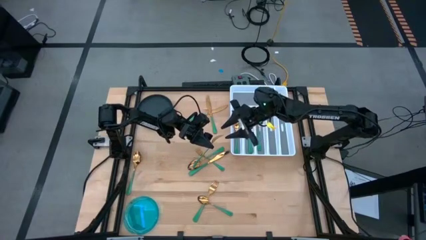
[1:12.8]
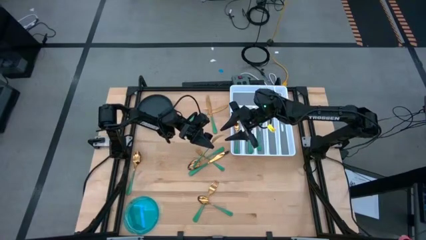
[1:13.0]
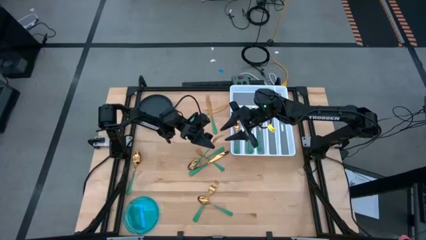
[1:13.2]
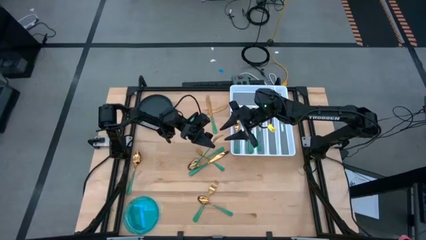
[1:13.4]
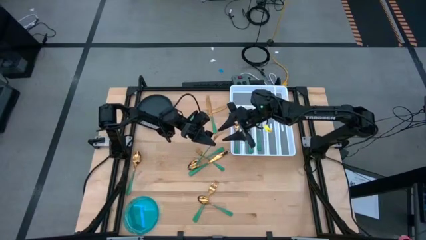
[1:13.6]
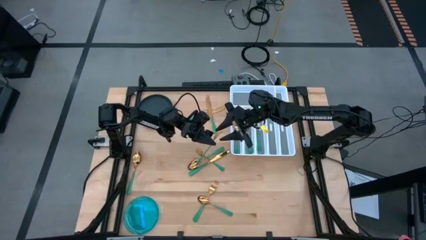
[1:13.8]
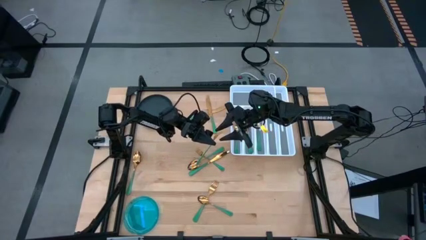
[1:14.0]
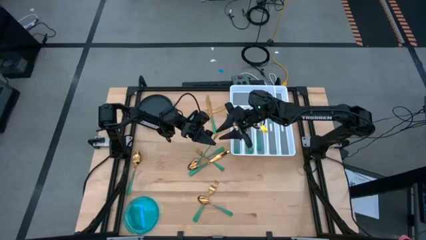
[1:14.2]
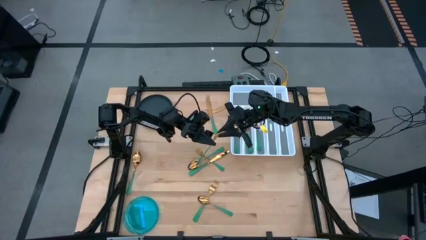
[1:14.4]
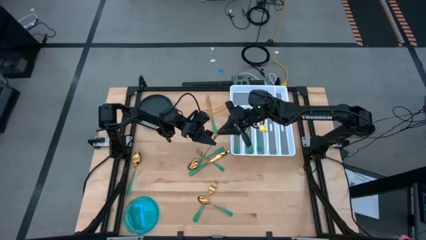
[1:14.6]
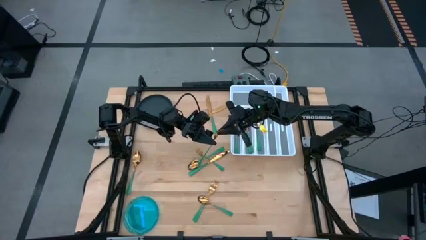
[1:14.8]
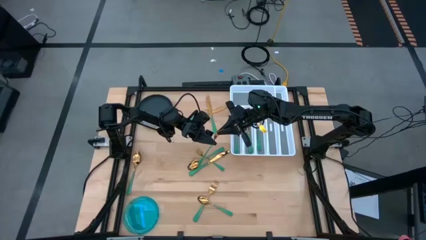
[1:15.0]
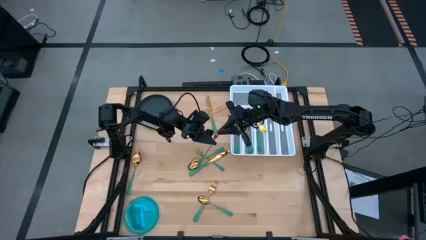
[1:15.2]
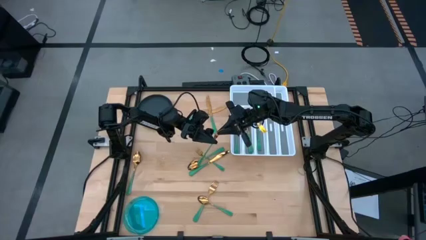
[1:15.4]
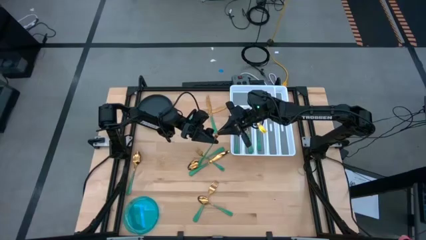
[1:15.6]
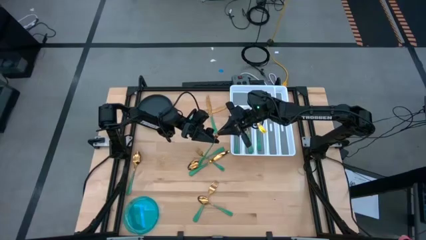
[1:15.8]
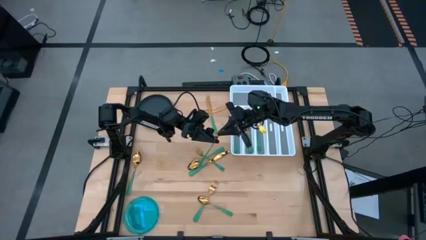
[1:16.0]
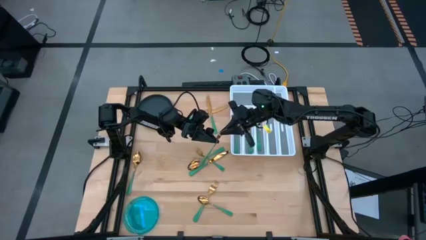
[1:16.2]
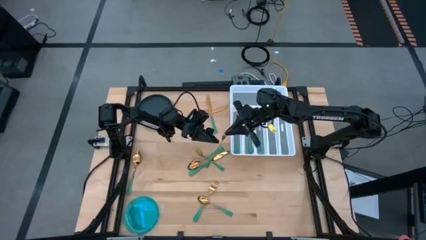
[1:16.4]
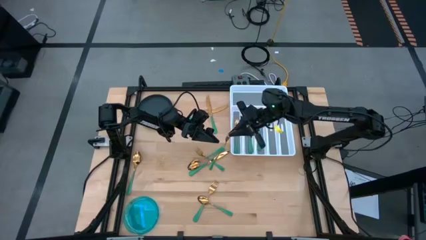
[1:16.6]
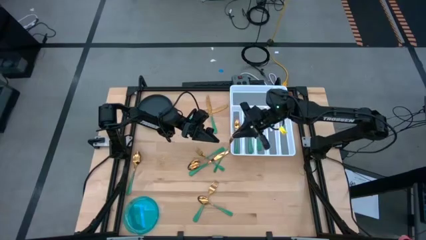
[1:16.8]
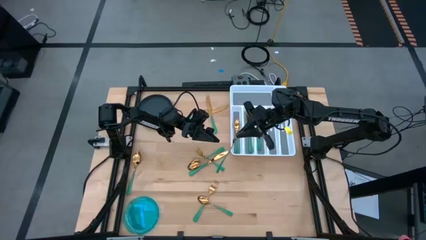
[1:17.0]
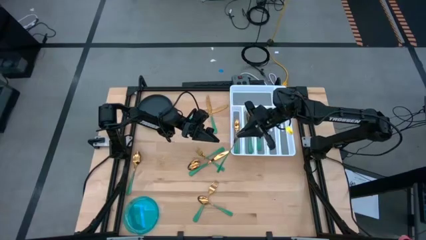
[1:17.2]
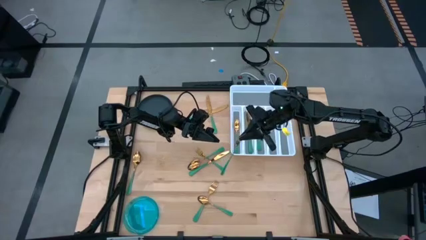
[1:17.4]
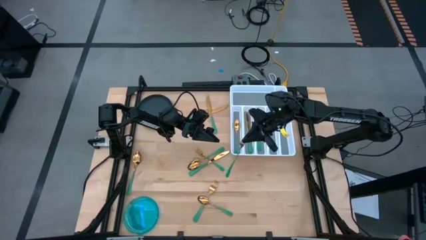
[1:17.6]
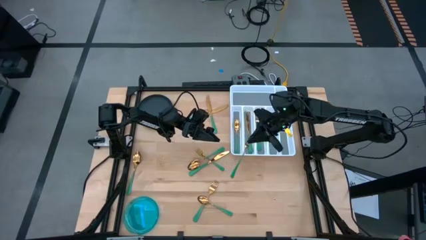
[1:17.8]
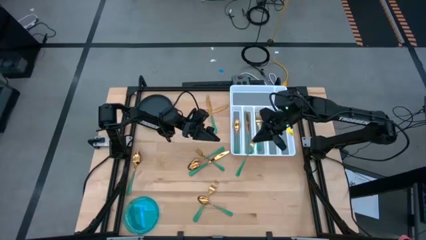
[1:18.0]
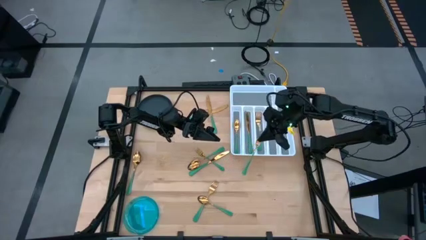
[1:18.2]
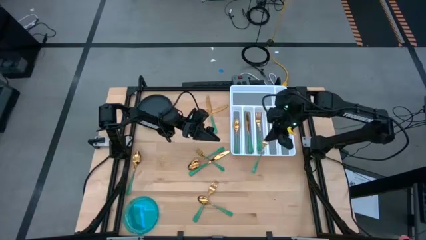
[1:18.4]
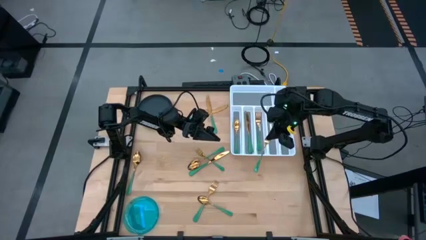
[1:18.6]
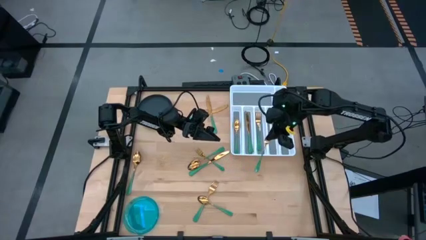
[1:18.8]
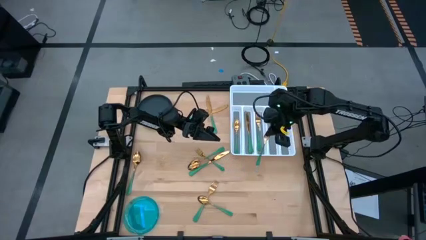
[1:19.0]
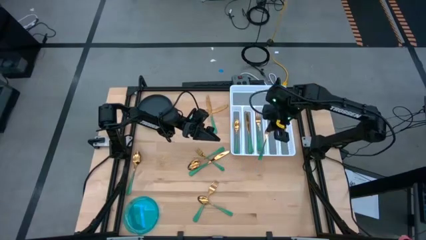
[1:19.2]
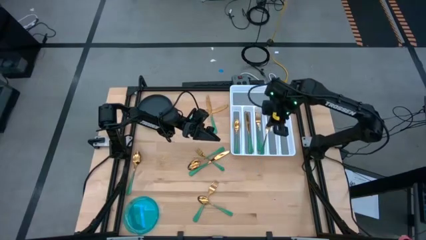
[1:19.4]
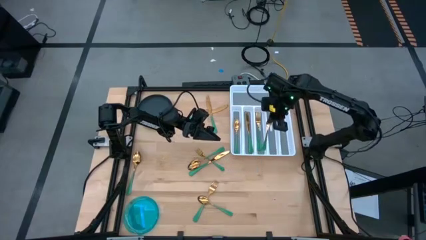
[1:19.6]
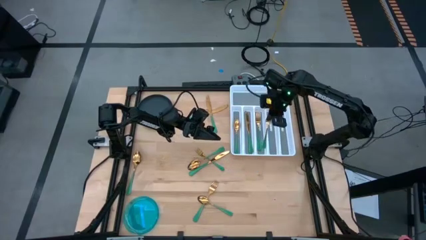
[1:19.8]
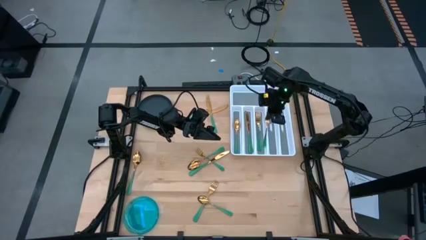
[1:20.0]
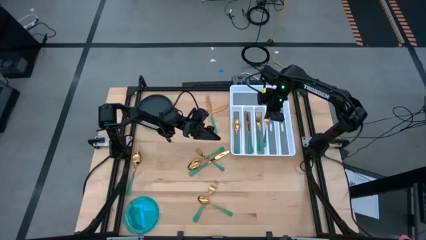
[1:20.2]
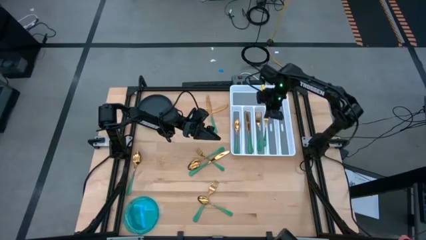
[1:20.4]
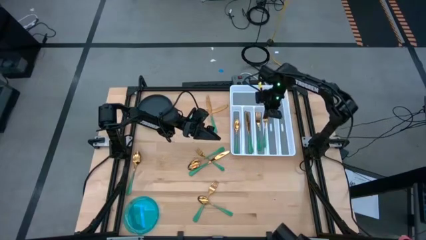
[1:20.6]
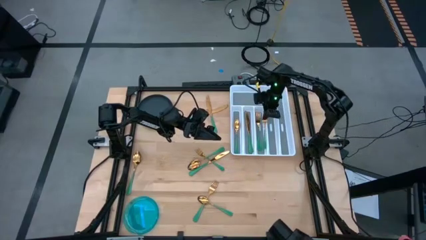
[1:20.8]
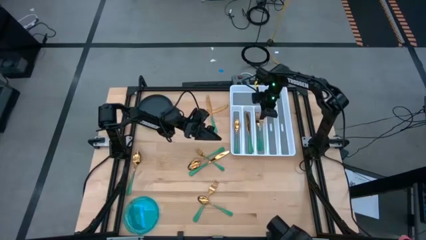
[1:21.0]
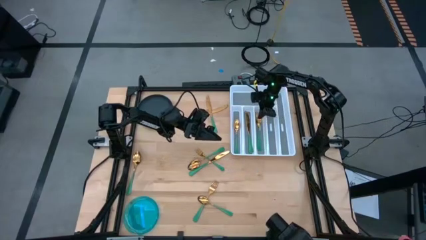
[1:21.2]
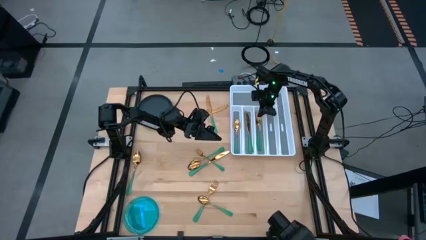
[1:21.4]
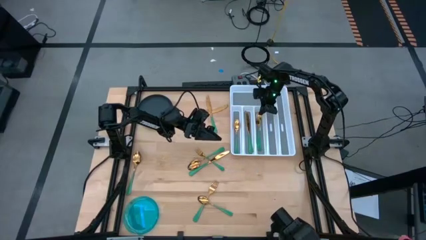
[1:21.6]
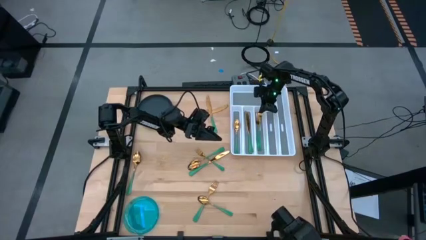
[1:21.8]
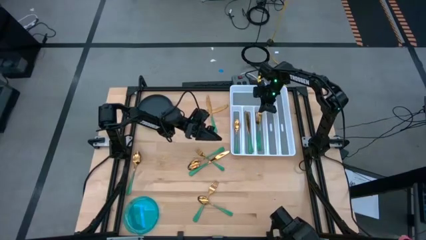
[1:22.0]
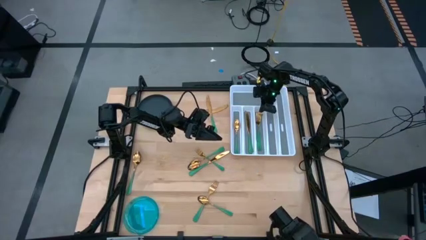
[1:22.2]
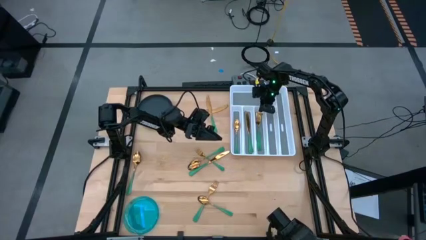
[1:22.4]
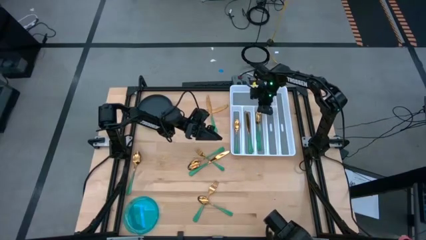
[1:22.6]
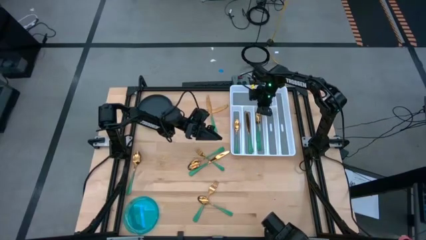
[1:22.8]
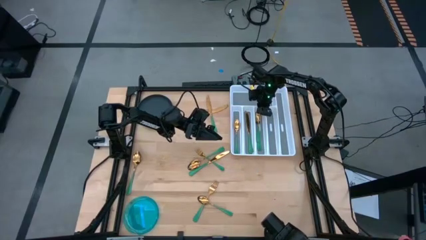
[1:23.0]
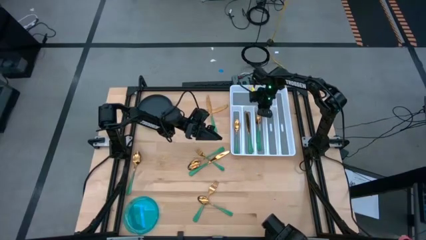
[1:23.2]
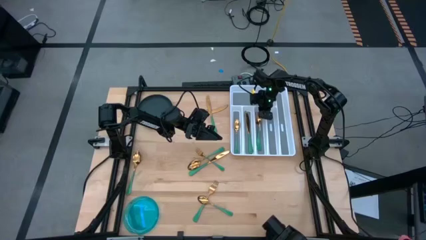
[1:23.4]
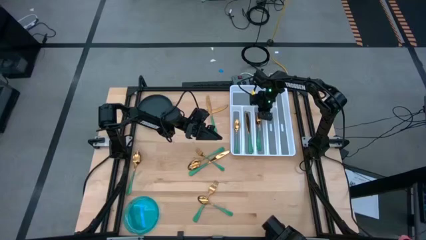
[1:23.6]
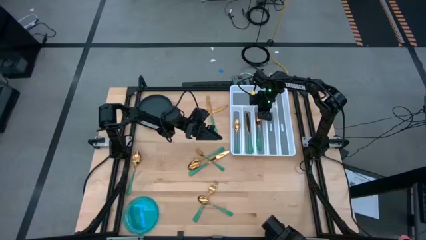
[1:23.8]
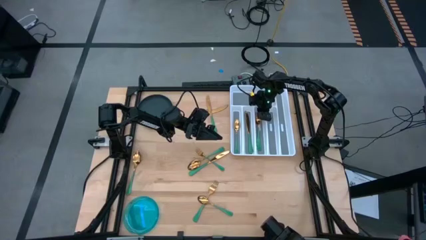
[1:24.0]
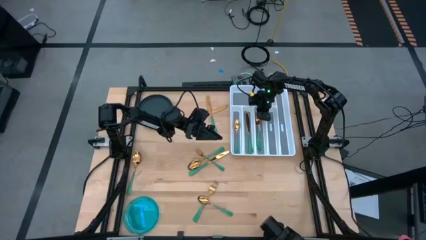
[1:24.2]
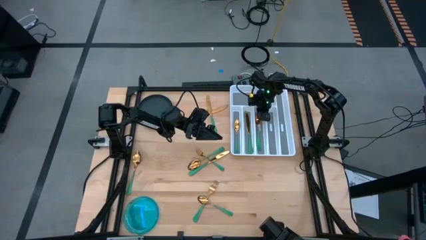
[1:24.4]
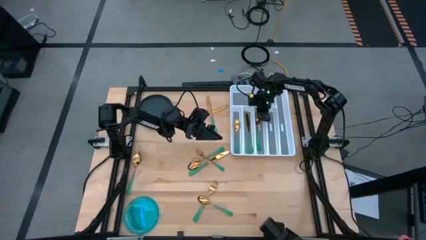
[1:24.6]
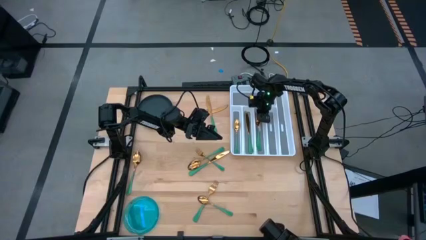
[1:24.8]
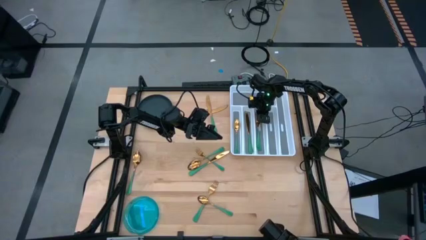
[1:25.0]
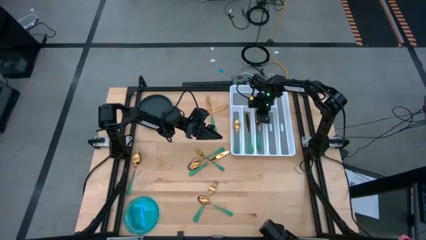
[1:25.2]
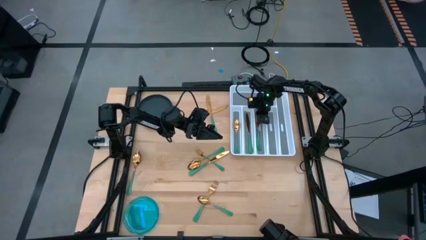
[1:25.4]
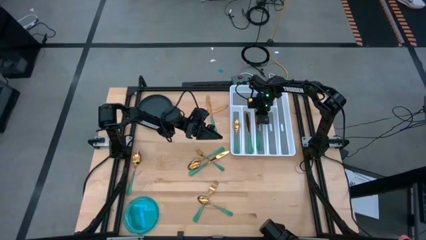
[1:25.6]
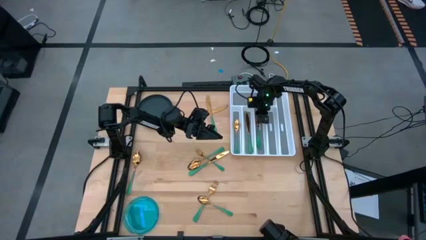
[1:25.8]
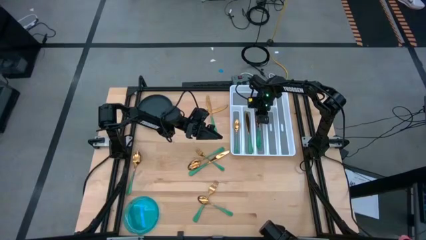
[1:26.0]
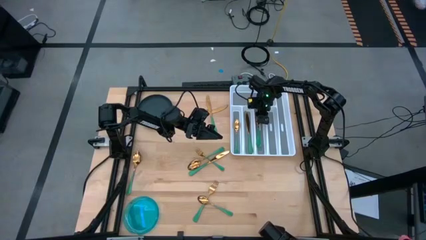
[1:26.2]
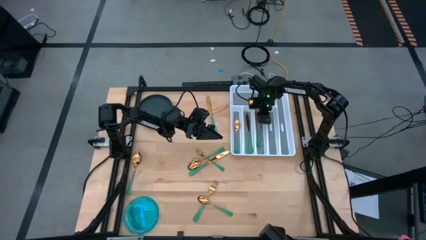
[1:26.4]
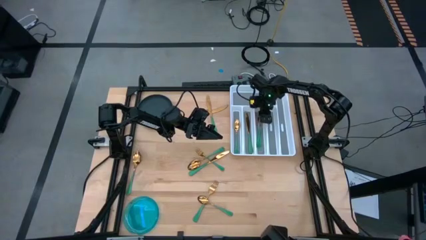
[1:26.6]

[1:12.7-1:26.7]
Task: Sort silverware
Put the green fork on the silverware organizer

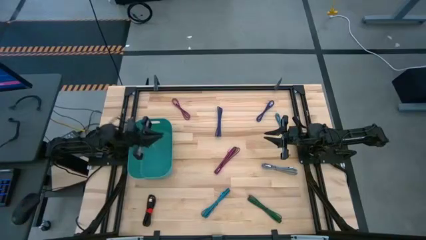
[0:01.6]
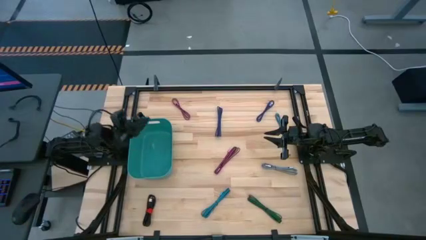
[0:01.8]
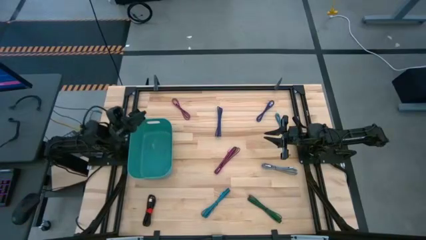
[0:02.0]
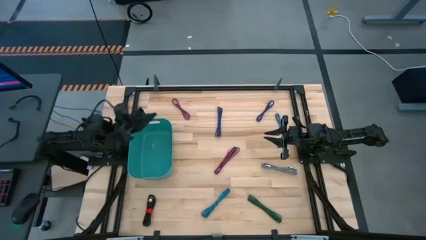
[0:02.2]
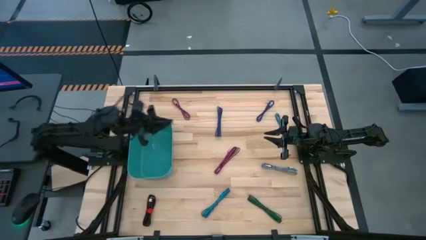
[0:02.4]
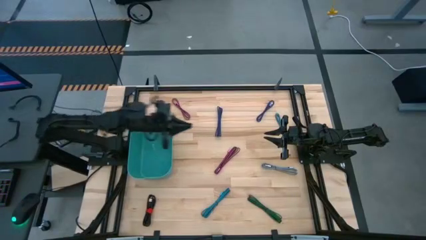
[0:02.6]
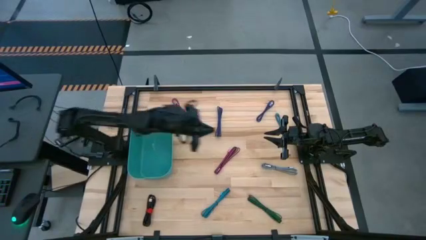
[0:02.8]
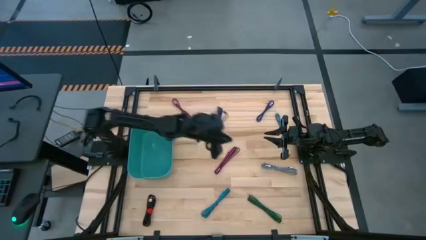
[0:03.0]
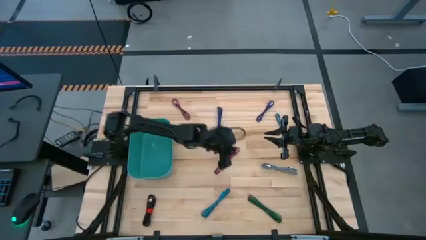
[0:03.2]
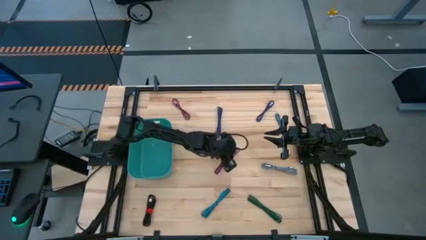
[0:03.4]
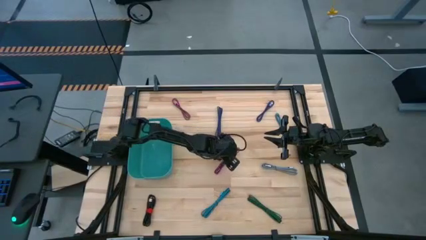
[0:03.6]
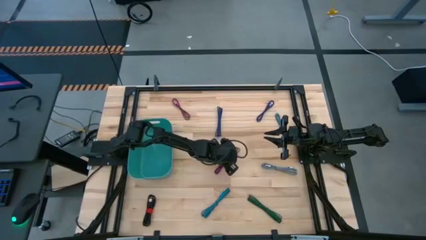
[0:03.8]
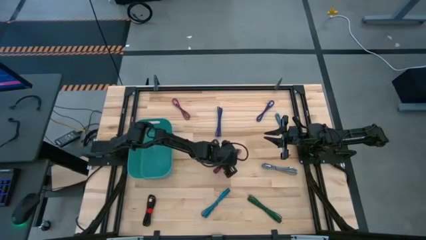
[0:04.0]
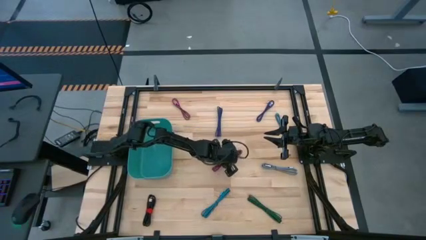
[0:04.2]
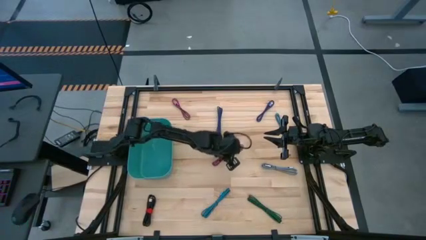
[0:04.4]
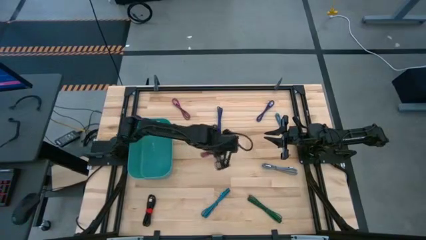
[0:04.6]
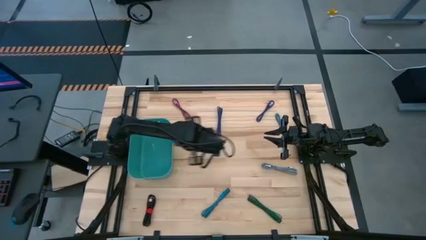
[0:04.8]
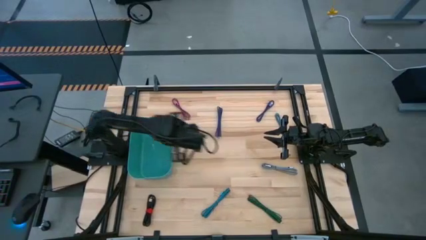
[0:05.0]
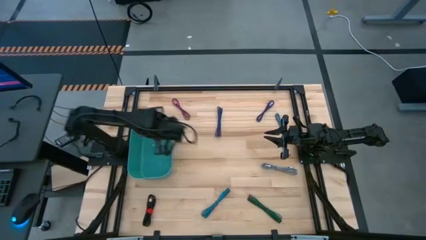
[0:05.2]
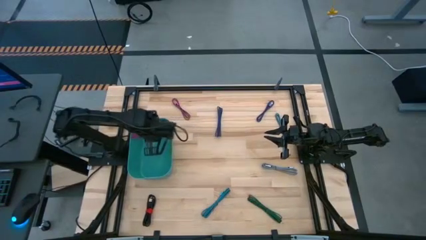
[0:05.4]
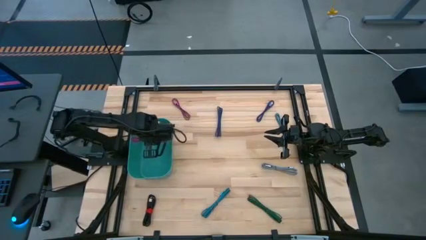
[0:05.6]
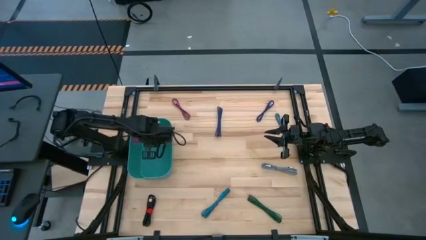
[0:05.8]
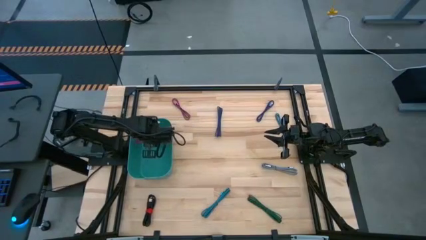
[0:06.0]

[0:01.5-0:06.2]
Task: Pick and place USB-C Cables
Put the bottom red charger cable into the blue bin
